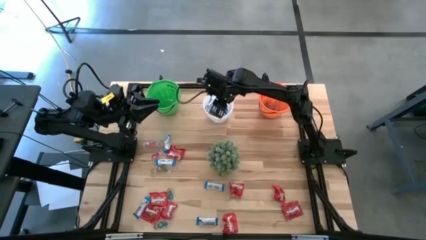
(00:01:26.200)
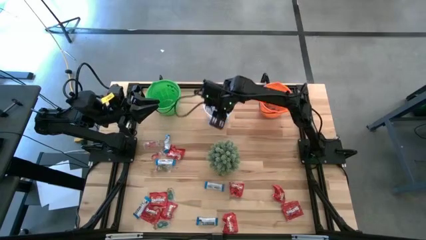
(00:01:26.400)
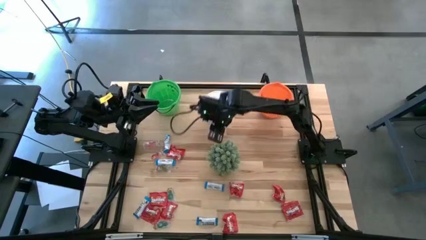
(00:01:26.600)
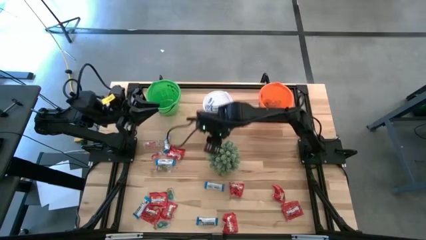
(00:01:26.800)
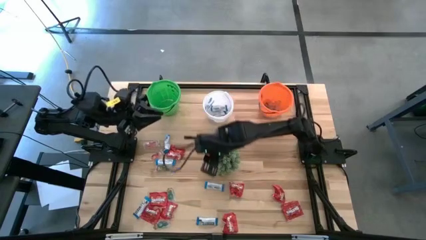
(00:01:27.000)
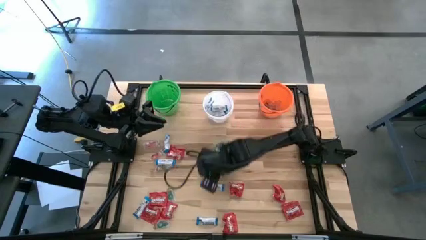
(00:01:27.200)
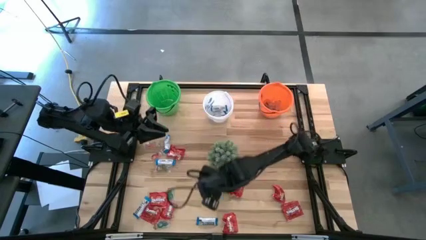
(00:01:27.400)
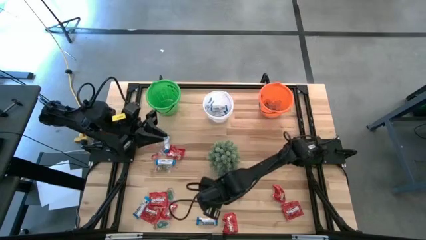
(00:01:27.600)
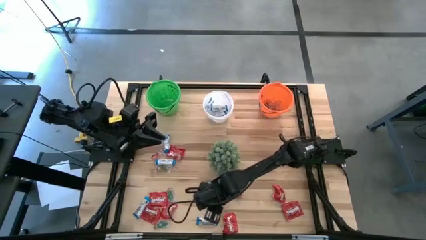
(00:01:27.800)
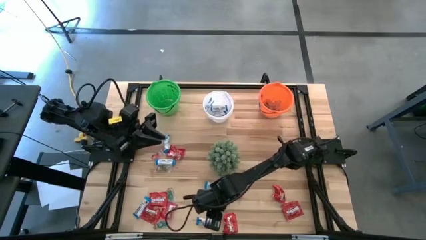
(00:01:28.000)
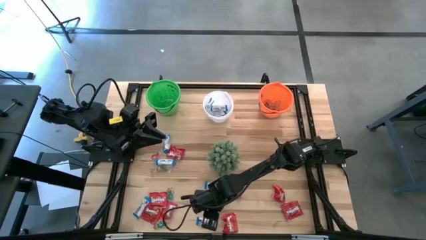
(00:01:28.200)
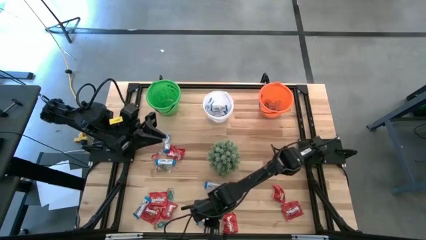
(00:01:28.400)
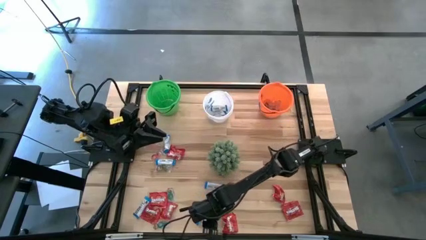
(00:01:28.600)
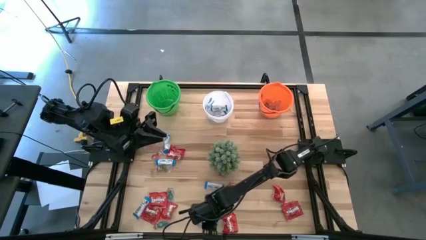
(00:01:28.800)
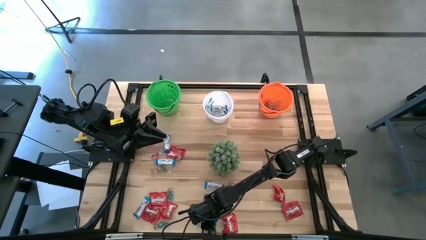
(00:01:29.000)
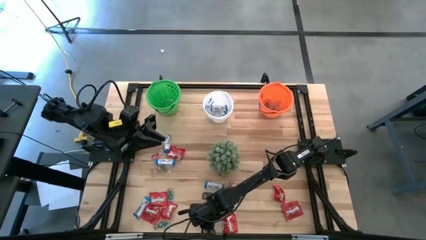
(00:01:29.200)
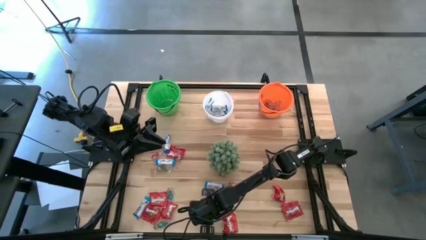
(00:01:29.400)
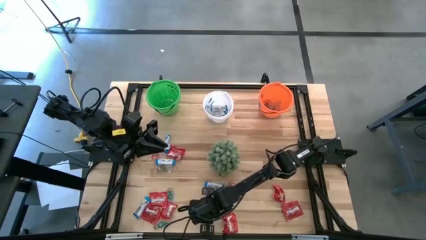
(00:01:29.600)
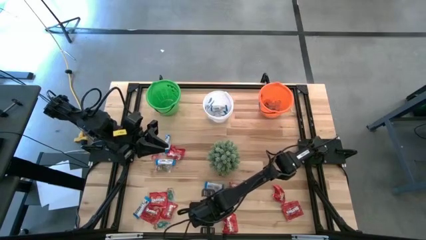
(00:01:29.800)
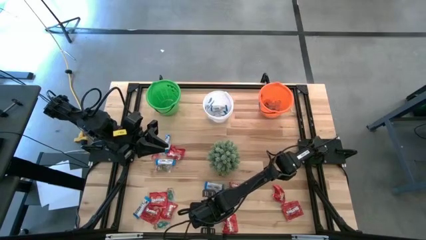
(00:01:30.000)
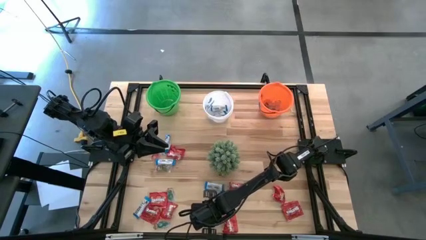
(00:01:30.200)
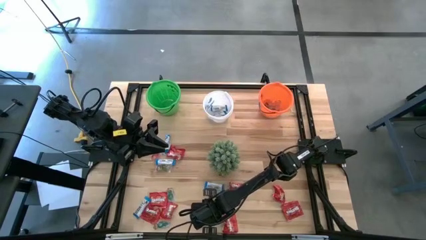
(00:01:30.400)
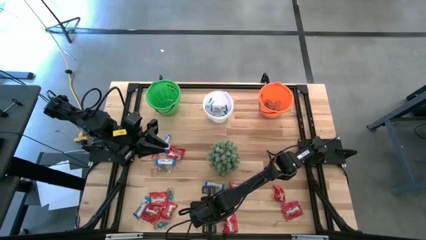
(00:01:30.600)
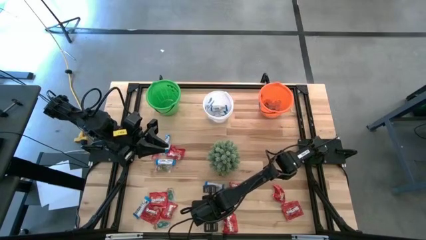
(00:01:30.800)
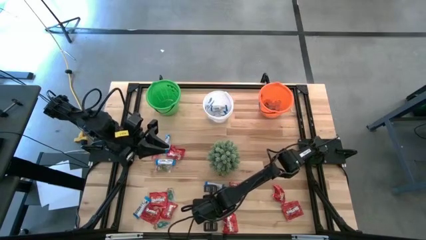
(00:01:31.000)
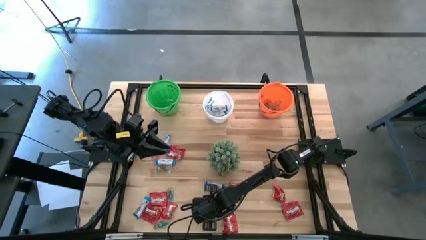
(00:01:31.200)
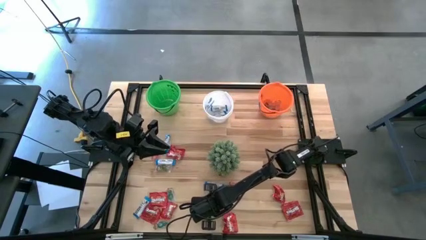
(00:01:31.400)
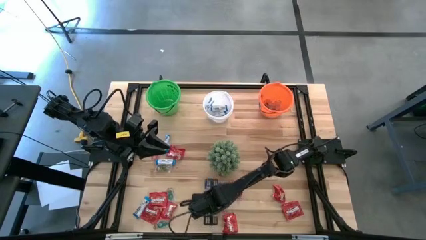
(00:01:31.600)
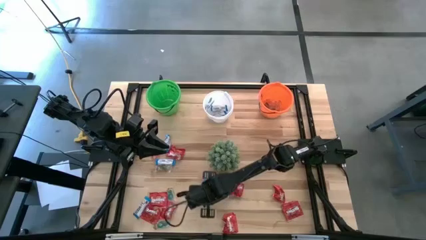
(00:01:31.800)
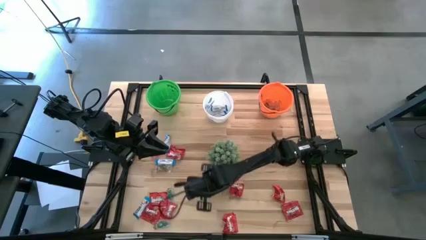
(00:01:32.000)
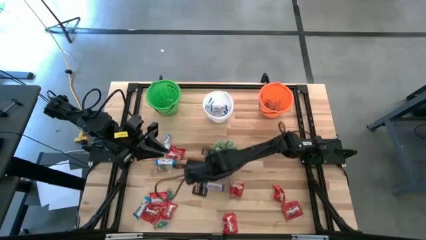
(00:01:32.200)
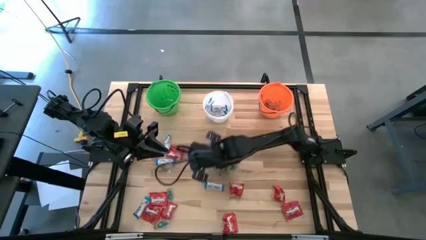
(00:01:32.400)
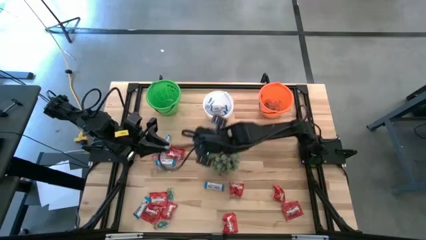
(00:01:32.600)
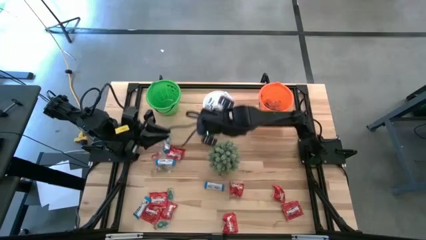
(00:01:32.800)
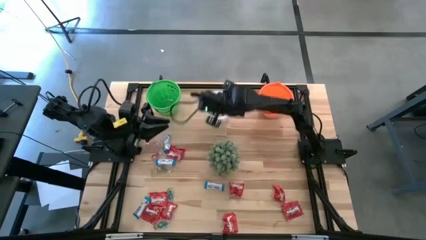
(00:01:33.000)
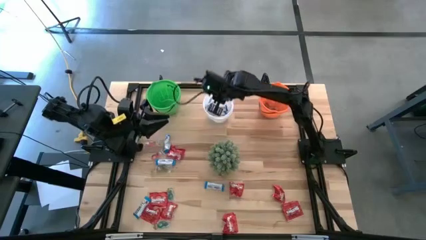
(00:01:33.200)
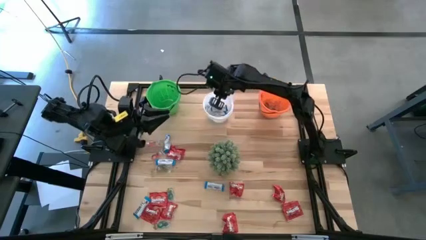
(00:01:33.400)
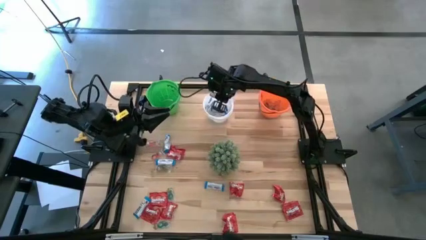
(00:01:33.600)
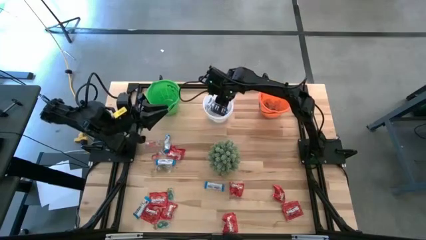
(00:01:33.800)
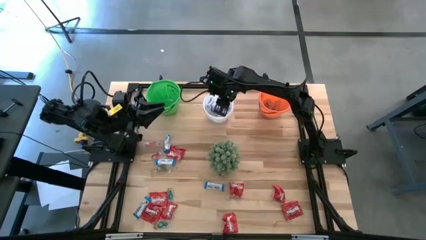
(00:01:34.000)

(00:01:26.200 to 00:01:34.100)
Task: Sort candy
Put the white chocolate bars into the white bucket

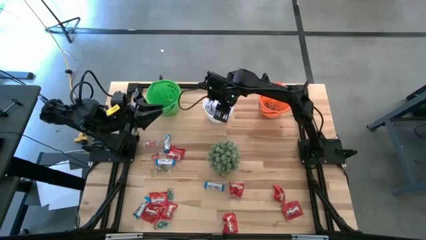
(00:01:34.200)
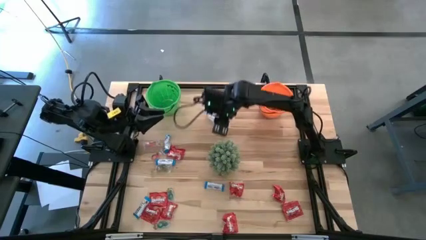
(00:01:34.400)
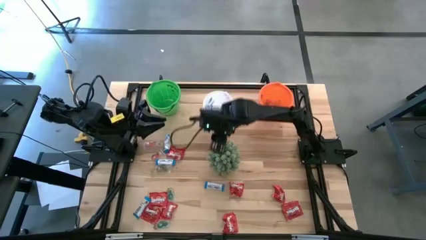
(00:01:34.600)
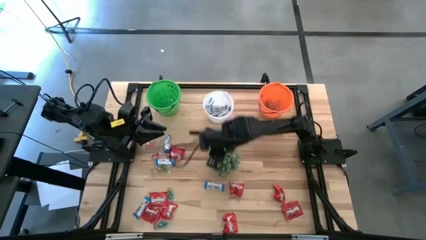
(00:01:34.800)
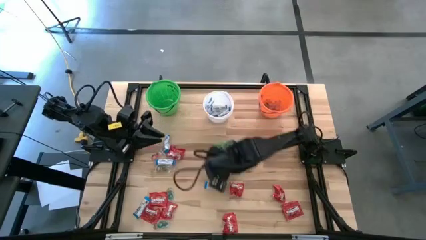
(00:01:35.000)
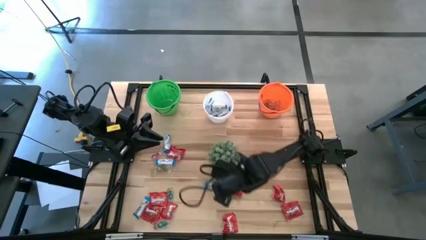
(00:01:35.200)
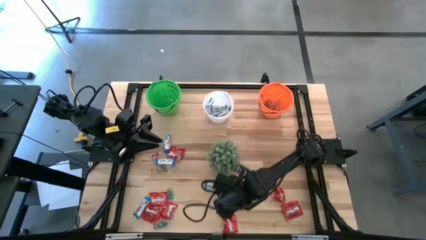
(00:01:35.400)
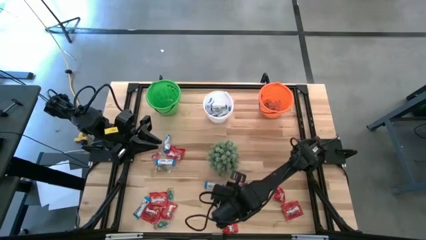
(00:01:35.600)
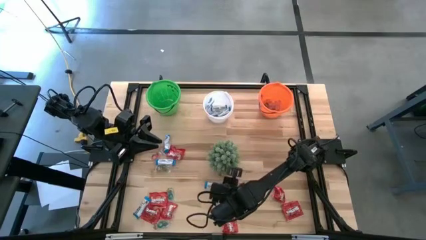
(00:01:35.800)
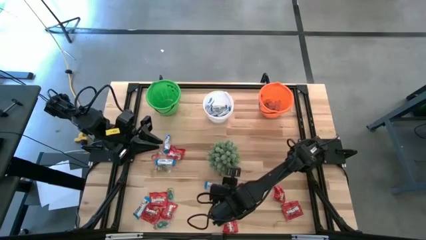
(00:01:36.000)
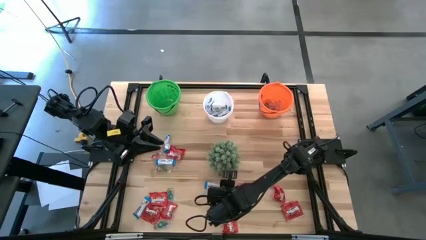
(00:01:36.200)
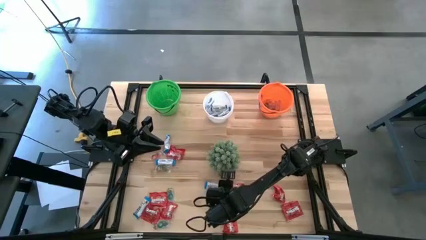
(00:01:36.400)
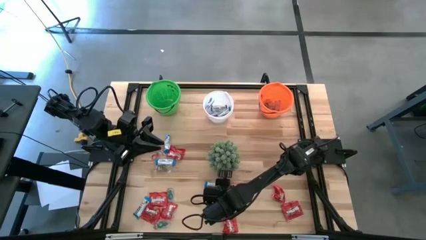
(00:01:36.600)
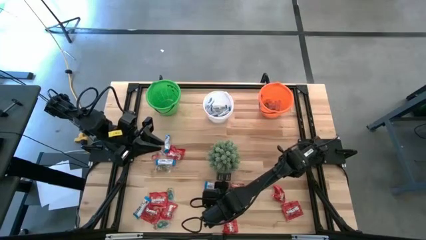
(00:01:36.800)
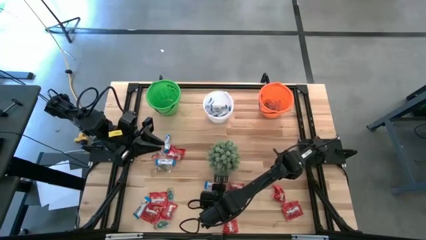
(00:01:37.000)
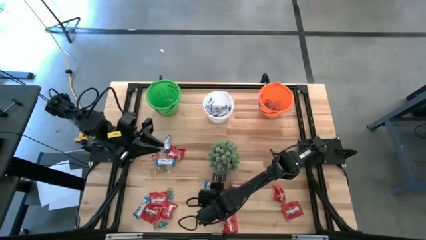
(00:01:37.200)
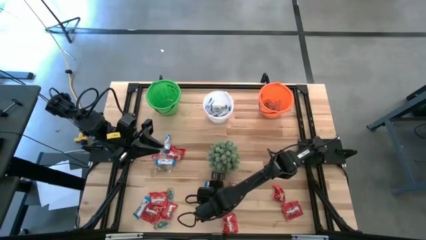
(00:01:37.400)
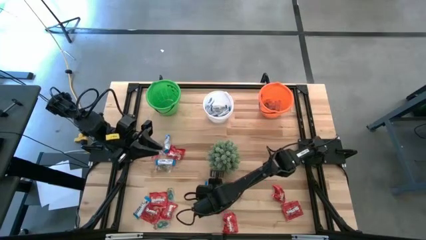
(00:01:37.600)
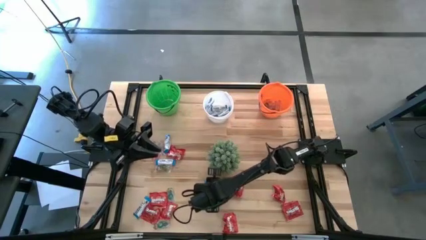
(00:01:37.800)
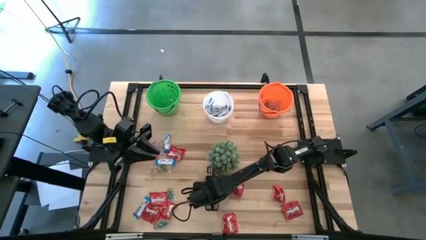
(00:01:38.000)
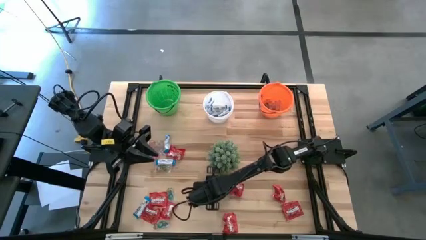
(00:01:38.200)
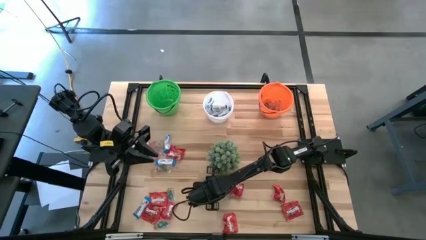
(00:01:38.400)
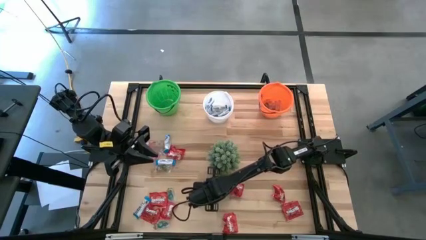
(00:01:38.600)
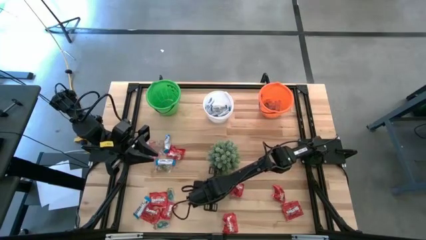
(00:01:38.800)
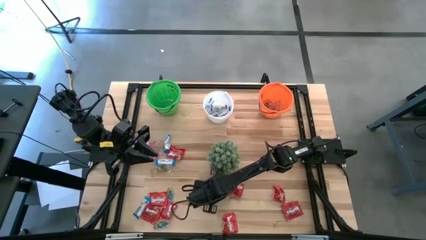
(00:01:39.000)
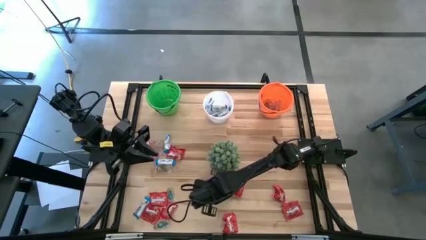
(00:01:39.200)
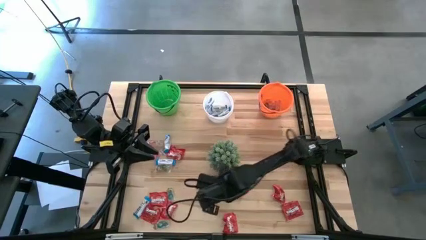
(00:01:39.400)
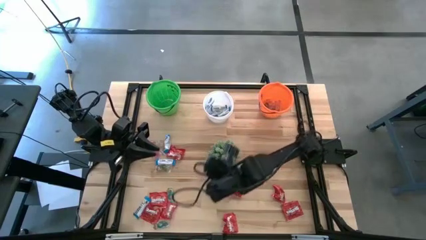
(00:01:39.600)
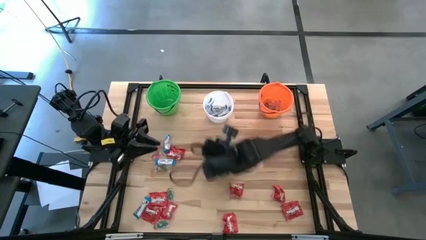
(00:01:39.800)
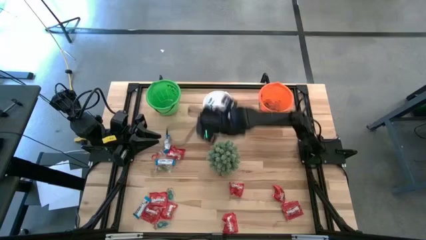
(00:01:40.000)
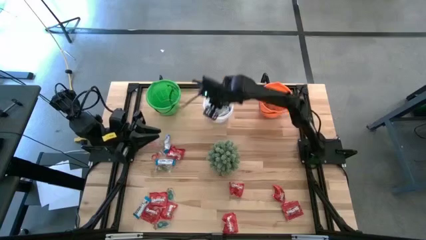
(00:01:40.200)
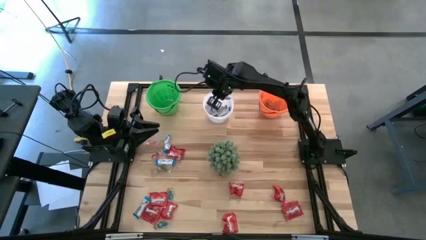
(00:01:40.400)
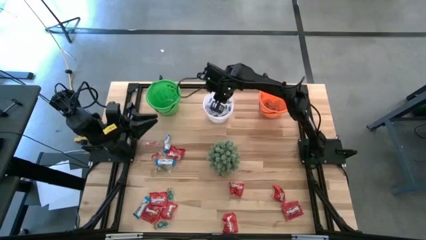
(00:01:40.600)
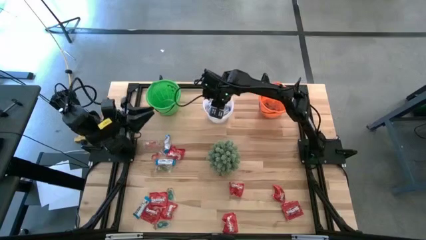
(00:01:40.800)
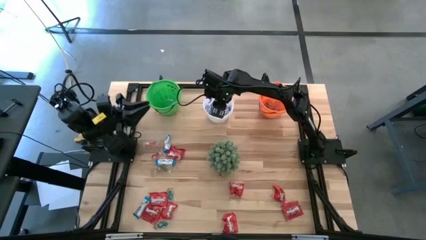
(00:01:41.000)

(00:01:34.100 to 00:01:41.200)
Put the white chocolate bars into the white bucket
